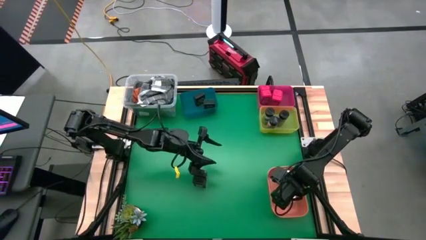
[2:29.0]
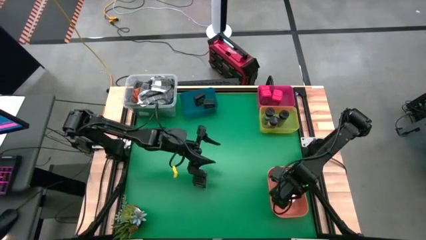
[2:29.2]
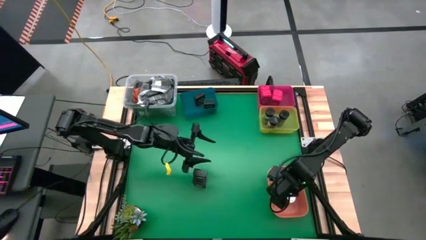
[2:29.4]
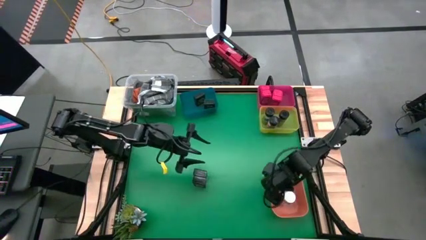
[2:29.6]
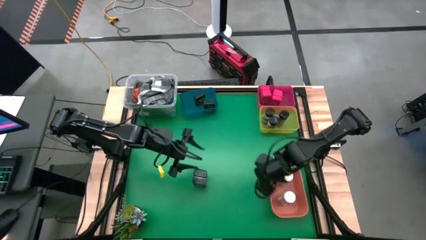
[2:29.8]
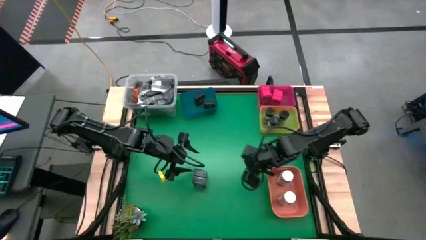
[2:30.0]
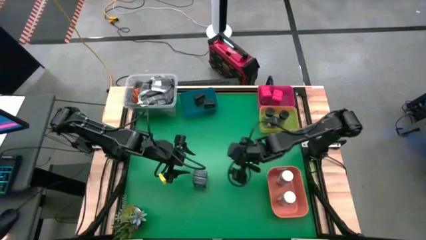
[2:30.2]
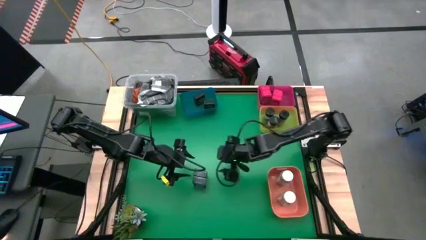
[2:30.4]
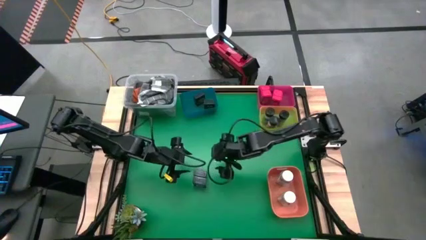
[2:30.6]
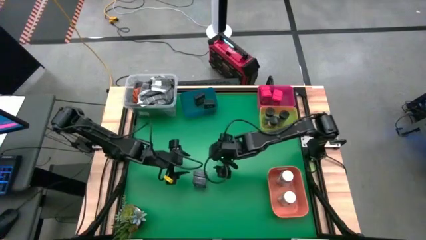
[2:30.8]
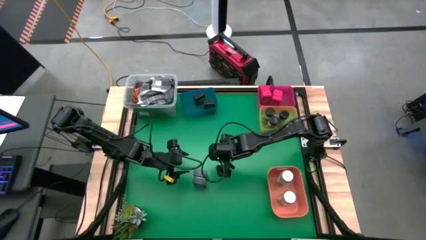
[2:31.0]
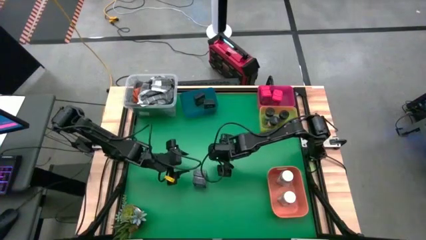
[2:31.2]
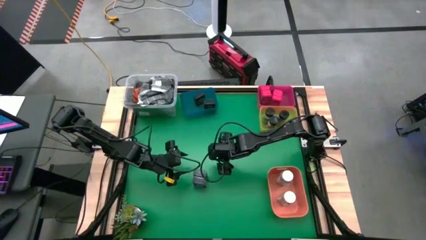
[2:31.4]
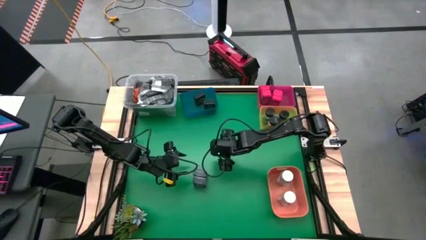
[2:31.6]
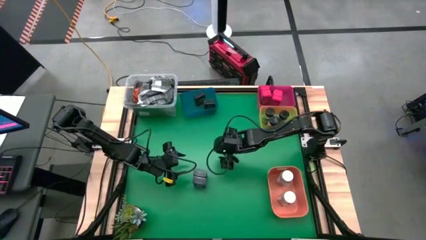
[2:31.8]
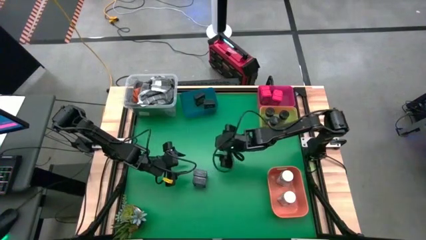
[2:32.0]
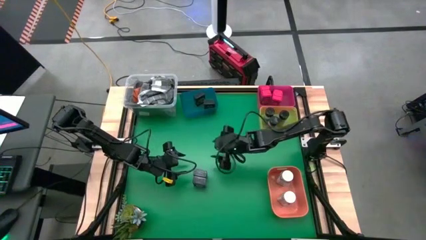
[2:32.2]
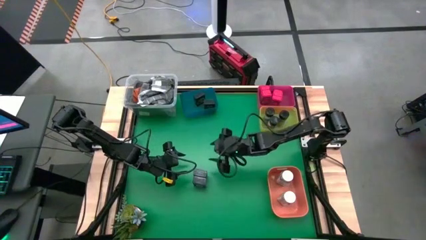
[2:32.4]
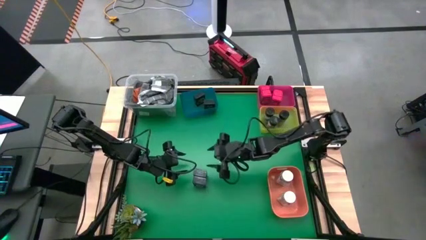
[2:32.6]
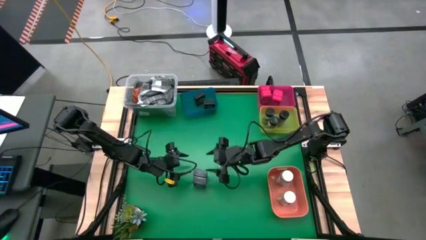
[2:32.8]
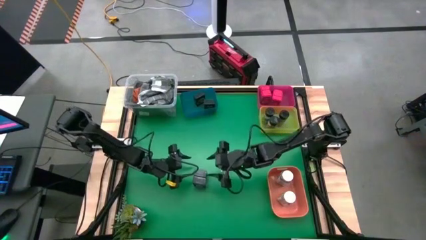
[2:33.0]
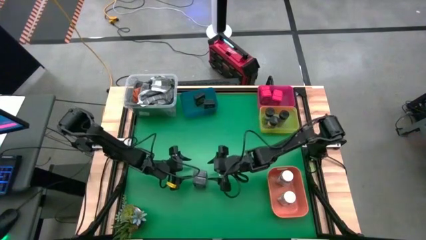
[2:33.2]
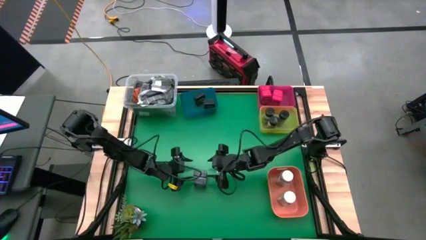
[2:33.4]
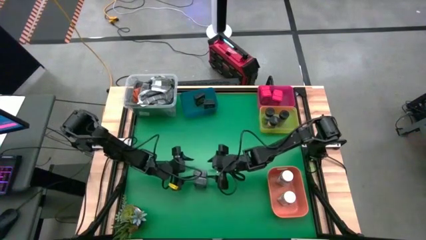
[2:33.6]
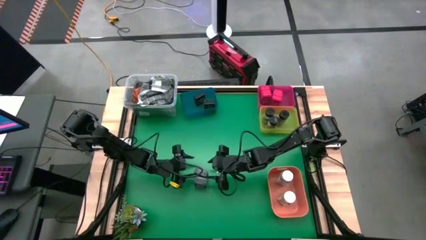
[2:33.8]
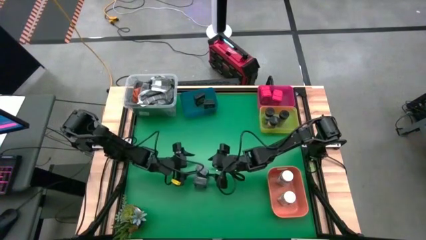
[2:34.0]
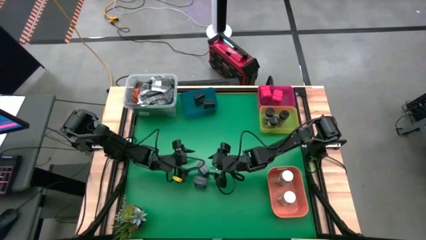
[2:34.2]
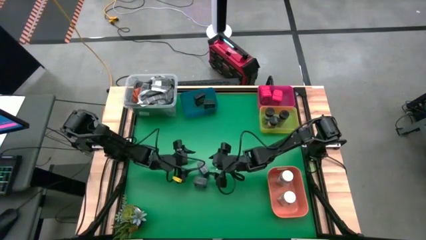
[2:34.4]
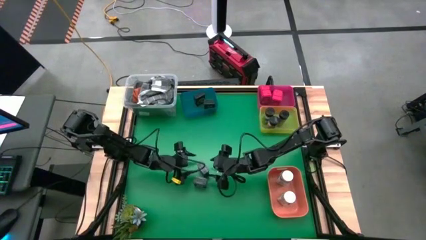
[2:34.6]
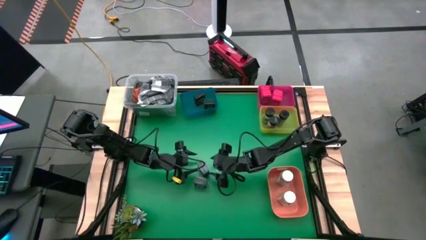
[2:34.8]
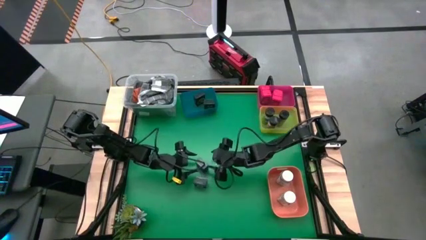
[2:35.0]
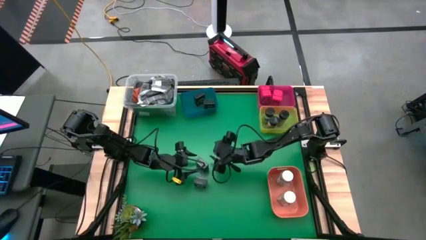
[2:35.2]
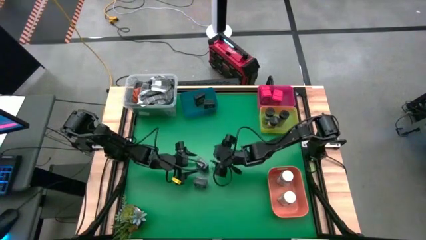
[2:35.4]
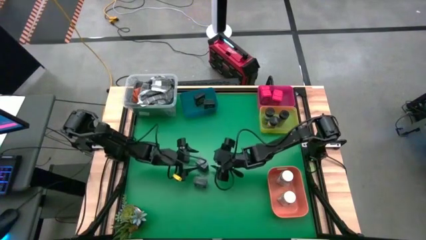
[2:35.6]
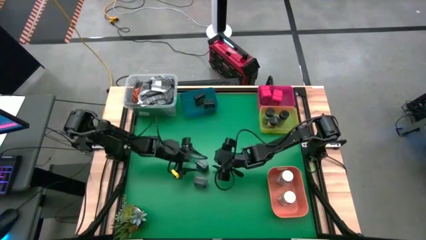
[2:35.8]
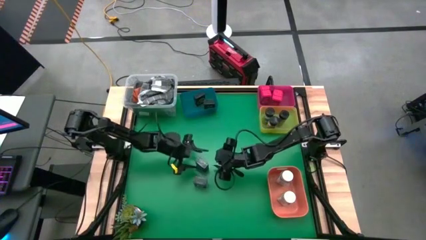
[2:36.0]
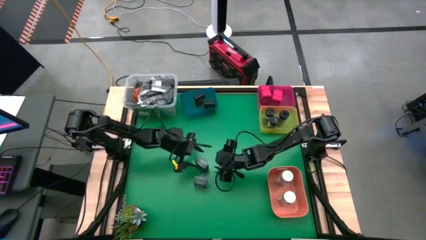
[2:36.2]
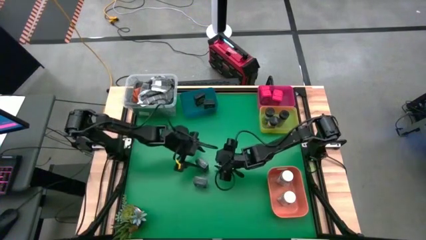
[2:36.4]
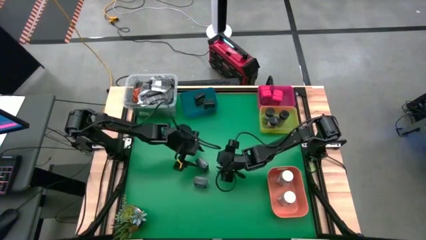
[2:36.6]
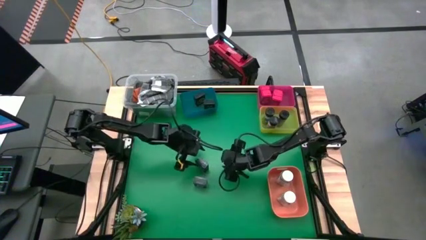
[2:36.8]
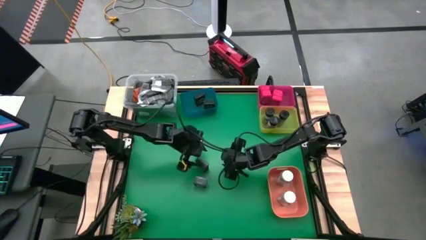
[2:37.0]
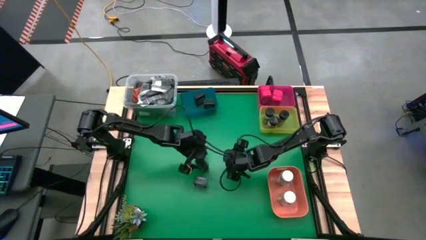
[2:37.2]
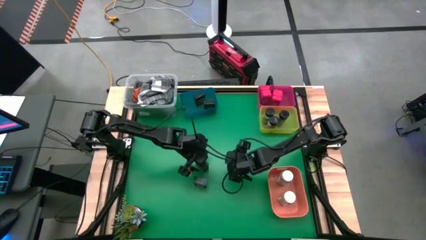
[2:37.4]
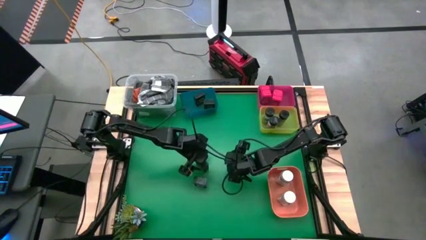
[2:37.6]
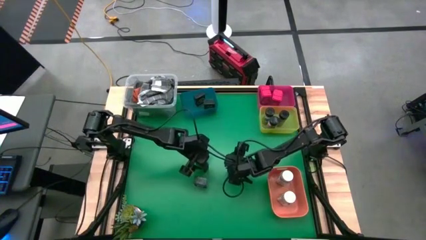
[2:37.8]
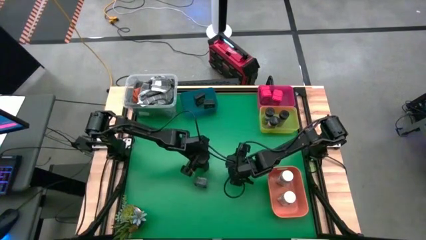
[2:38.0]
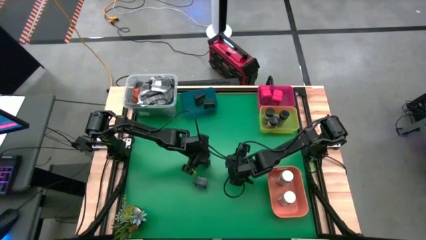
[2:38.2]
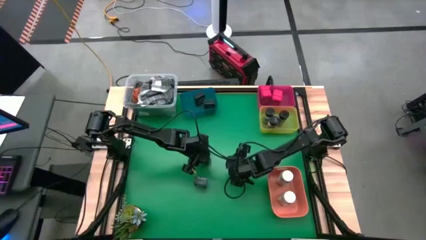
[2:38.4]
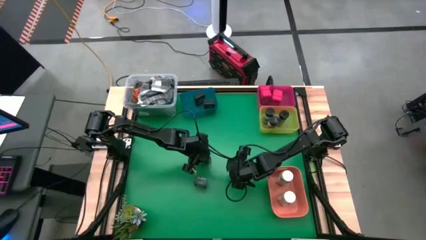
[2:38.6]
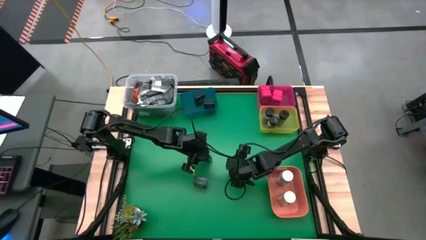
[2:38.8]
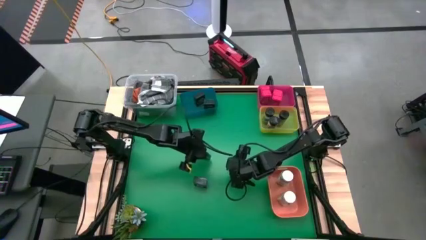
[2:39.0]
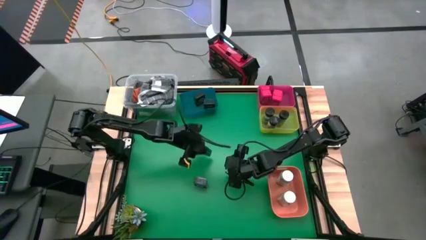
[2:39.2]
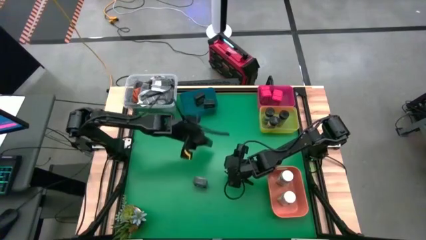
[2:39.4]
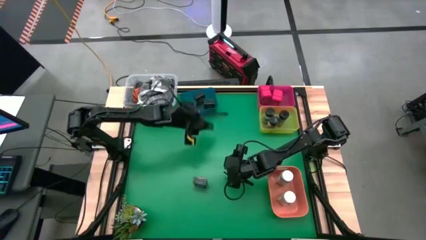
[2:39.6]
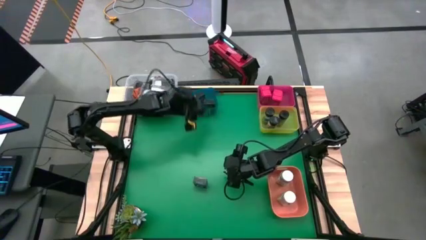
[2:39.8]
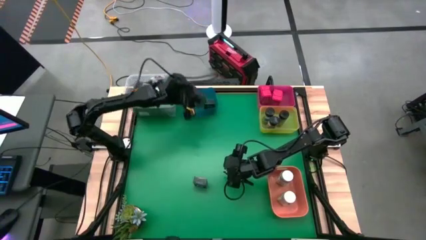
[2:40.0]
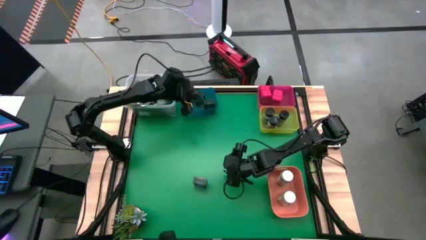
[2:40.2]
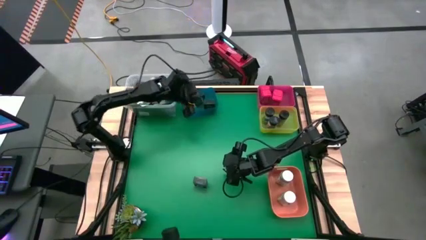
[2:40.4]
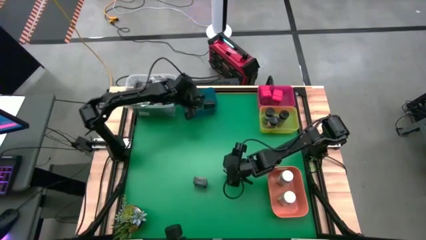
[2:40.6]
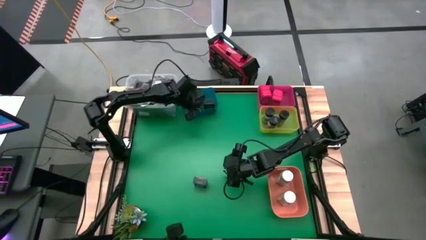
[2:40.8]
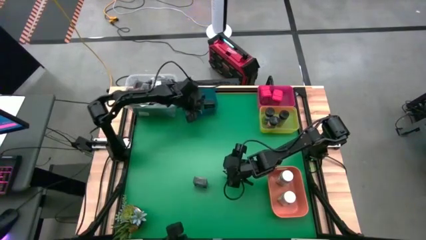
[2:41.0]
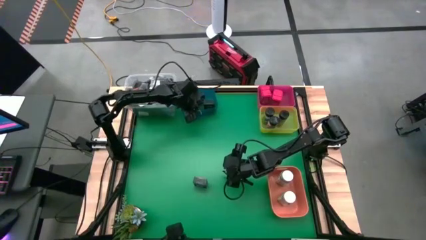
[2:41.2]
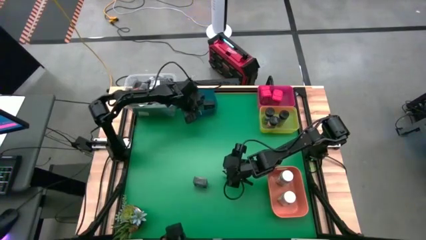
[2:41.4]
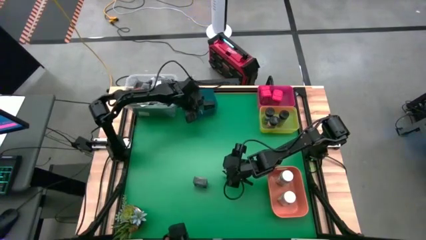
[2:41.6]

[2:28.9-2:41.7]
Task: Sort spices by type
Put the black seasoning from the middle into the orange bin
